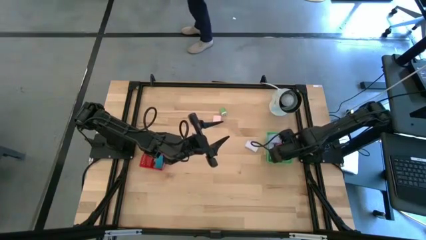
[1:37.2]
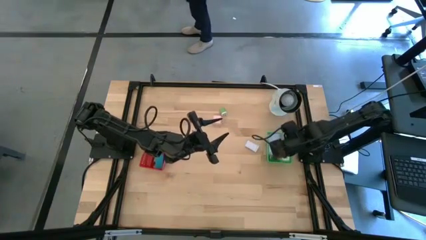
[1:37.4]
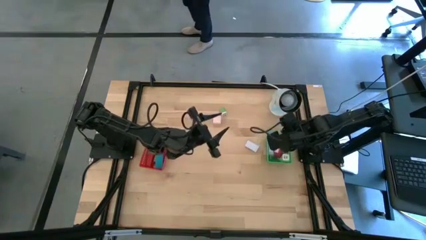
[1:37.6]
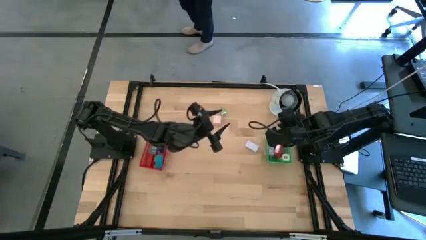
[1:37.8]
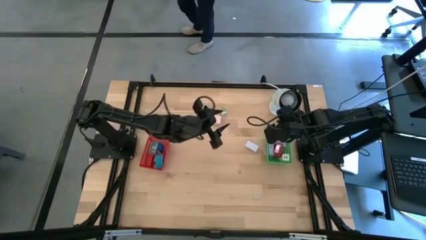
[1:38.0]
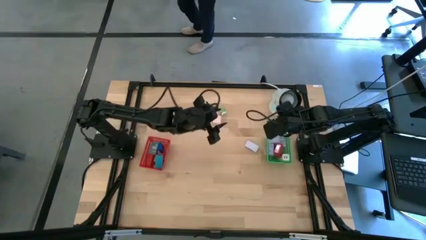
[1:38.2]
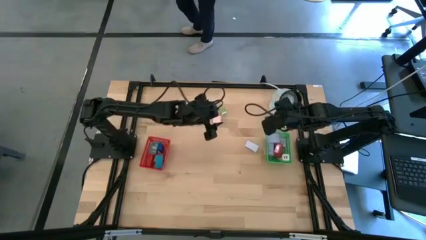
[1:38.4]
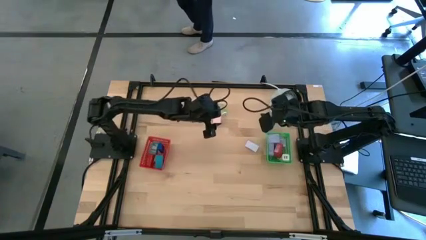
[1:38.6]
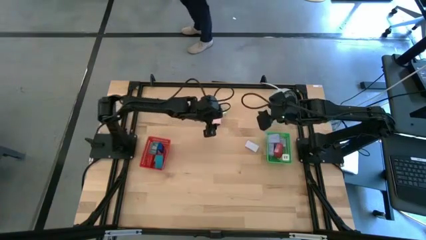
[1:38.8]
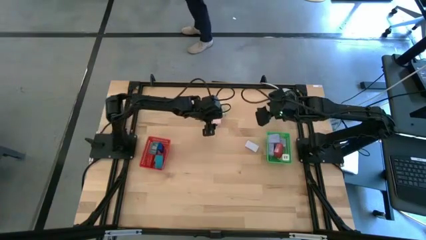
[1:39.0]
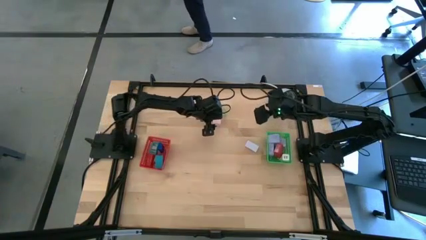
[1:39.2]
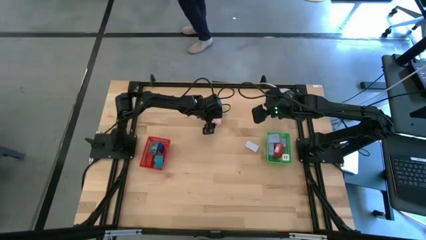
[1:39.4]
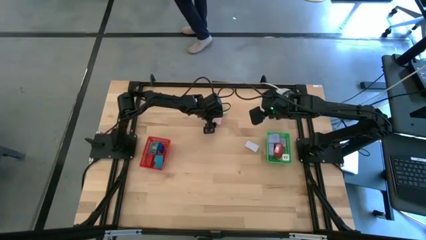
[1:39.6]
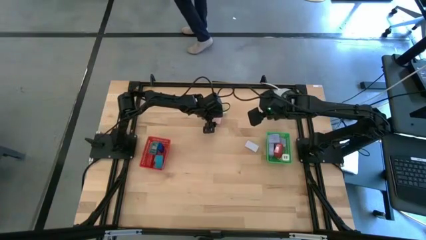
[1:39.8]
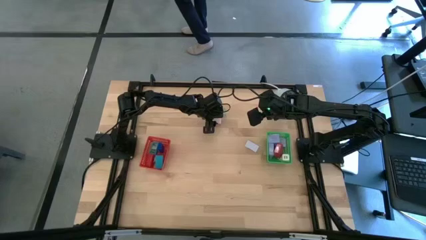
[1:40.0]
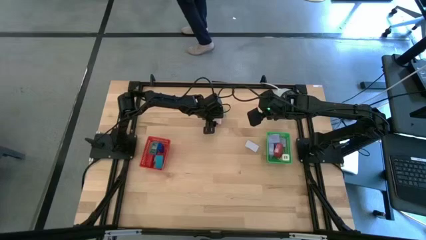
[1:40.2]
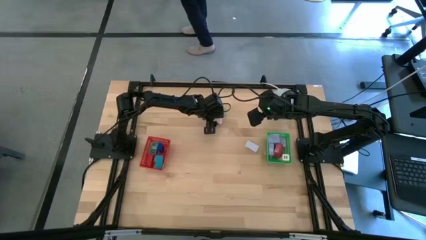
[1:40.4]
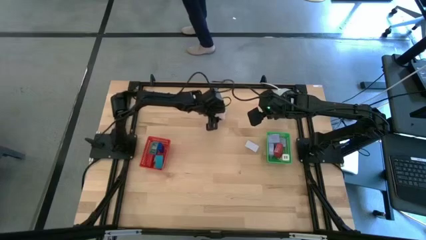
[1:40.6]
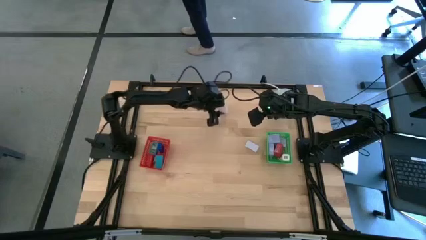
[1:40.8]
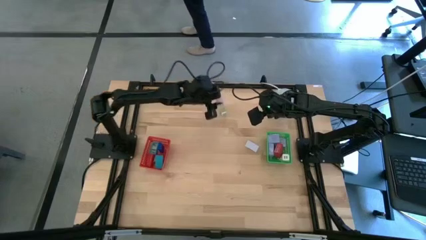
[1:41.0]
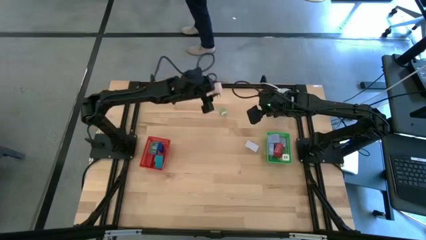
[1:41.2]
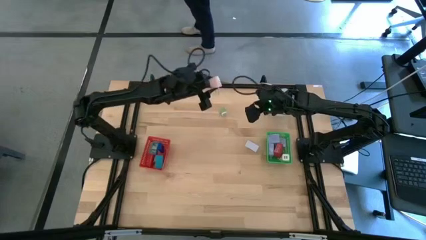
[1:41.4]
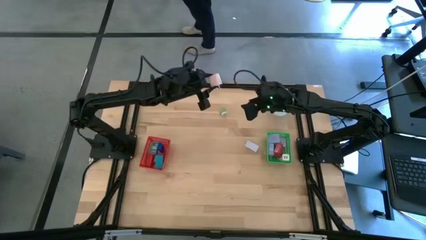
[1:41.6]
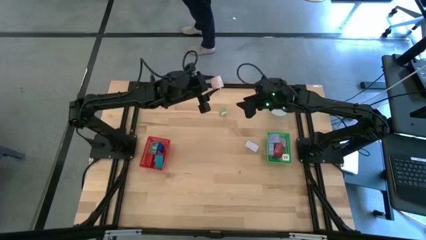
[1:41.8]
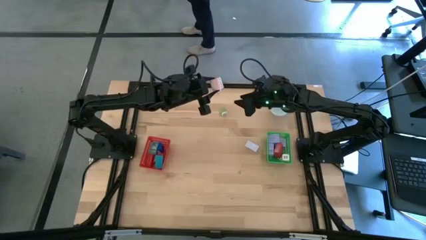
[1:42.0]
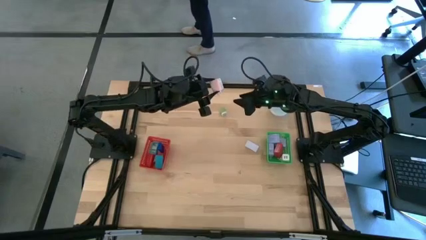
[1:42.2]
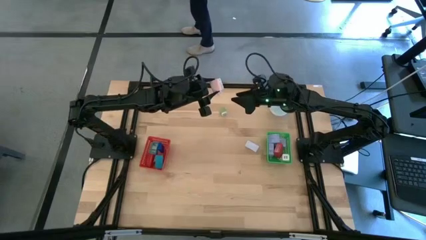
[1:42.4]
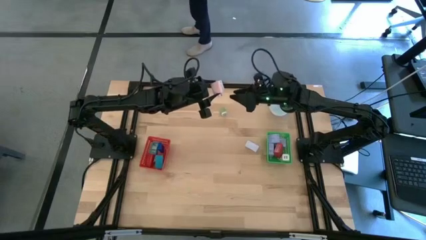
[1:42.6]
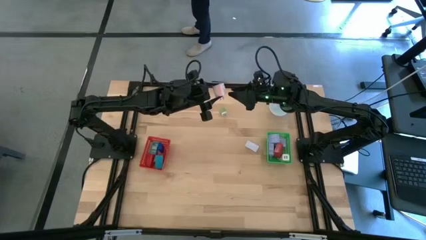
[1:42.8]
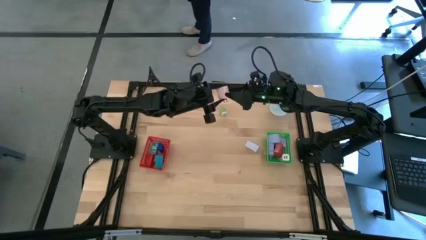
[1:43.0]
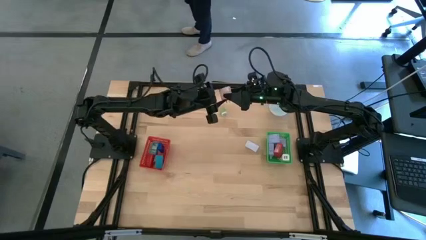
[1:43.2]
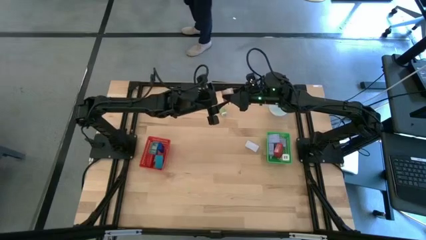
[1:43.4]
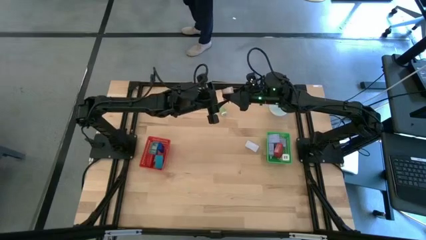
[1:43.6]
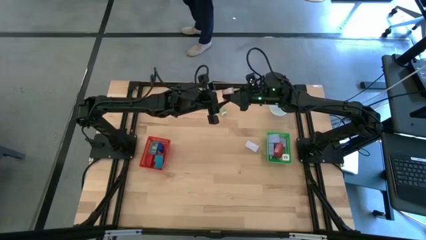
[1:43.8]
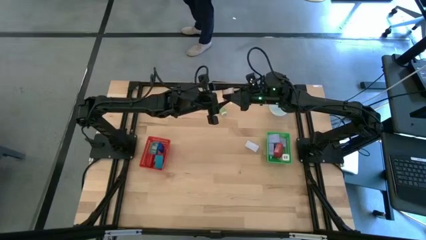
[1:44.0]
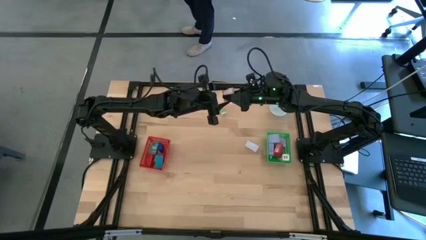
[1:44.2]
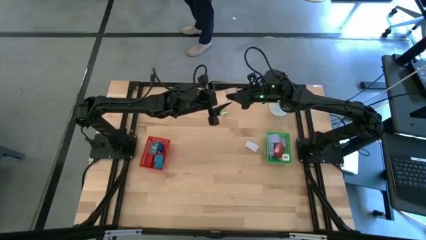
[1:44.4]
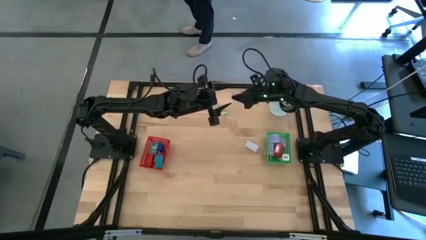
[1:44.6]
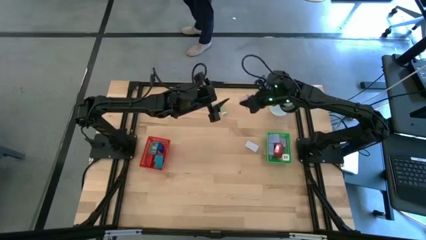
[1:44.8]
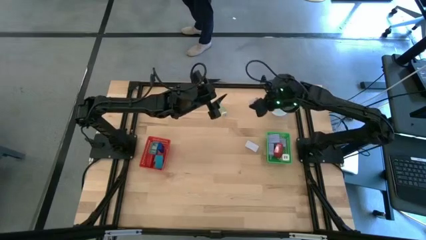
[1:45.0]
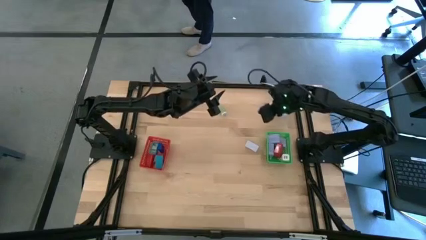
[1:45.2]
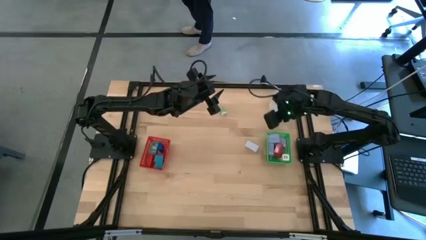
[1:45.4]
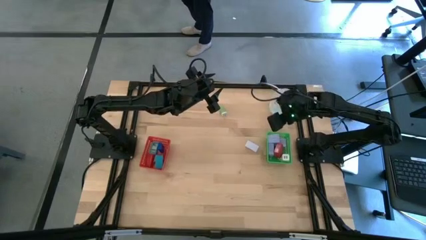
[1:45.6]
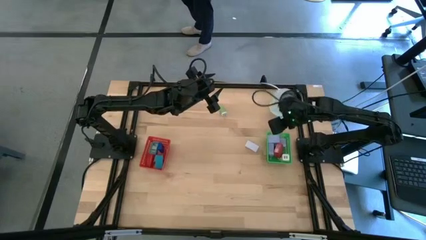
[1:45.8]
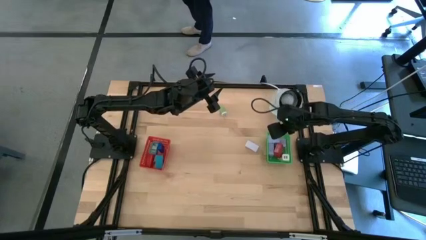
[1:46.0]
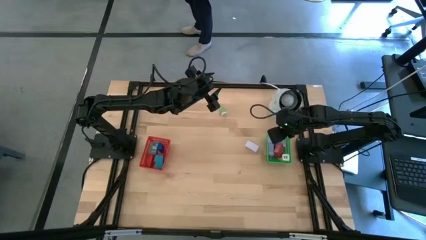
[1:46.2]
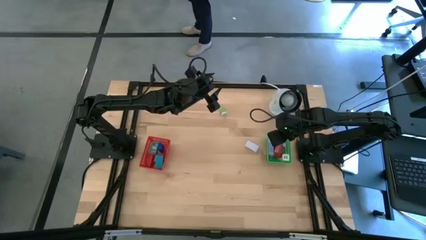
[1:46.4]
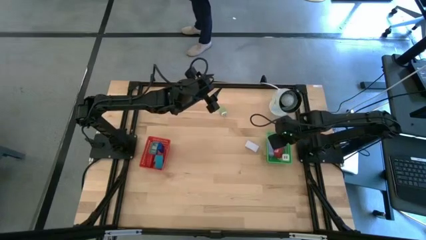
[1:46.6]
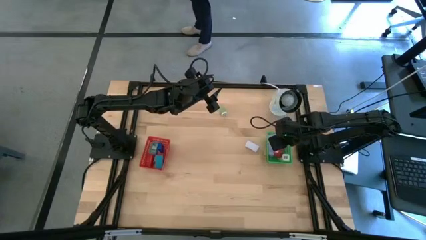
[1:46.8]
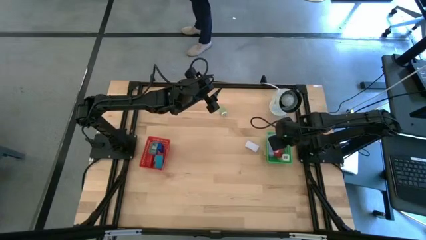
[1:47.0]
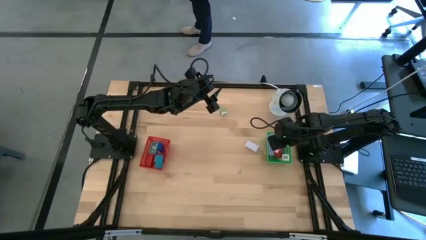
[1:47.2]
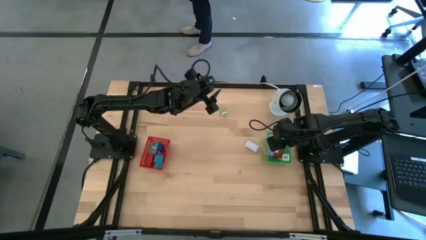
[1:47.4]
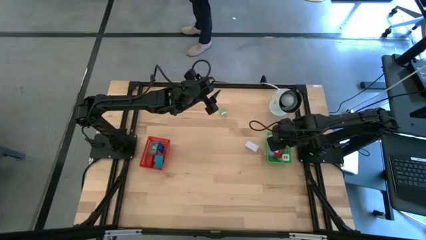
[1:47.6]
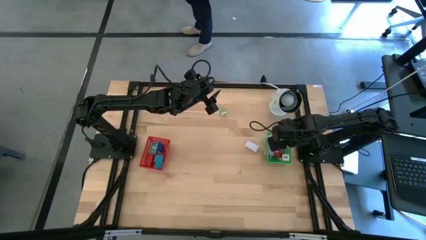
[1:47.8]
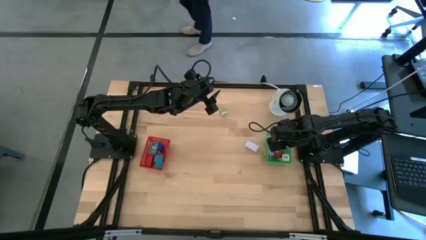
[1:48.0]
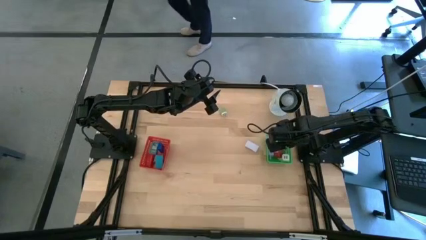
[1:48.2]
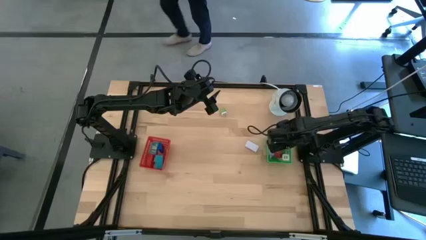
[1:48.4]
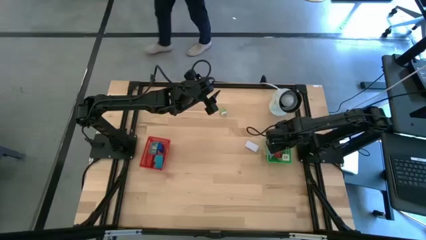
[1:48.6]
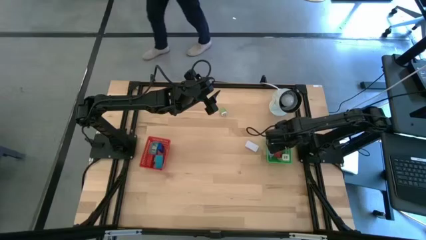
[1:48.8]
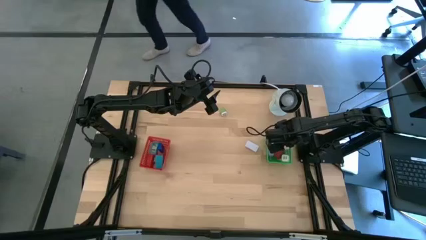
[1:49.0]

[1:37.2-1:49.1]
Task: Pick & Place Office items
Put the pink charger adapter into the green basket

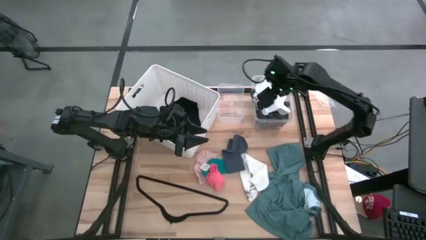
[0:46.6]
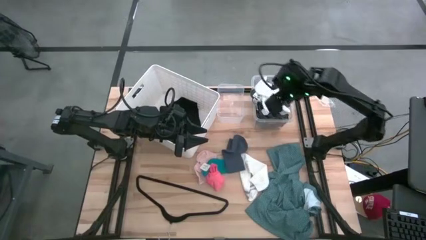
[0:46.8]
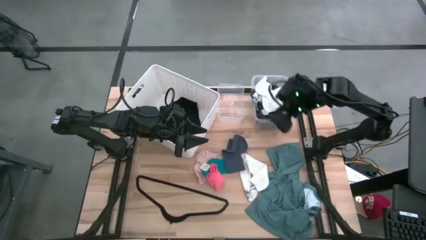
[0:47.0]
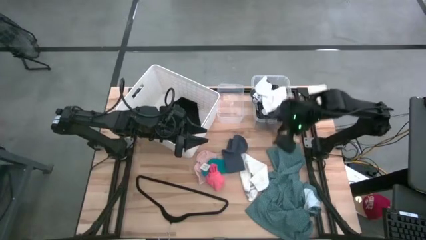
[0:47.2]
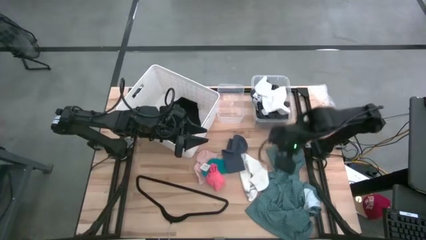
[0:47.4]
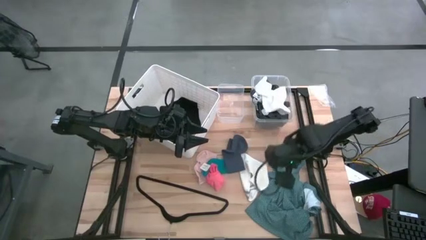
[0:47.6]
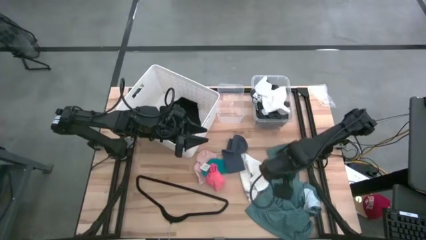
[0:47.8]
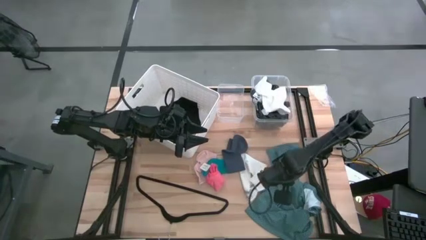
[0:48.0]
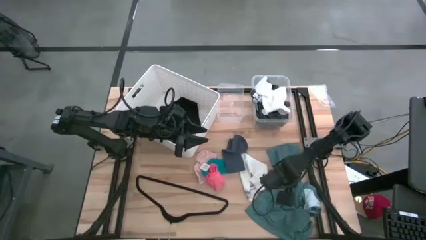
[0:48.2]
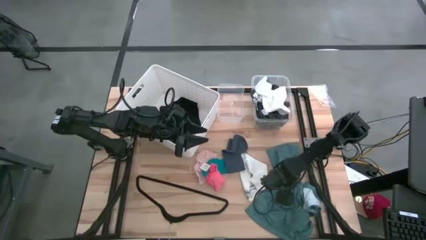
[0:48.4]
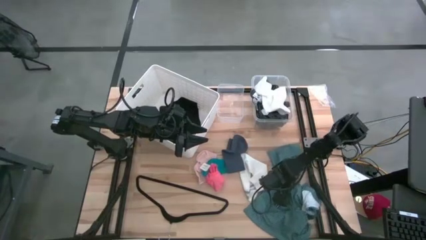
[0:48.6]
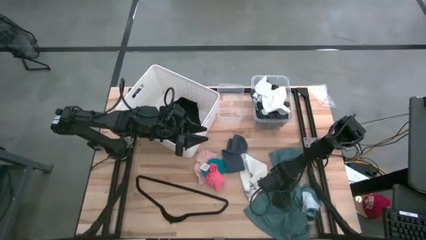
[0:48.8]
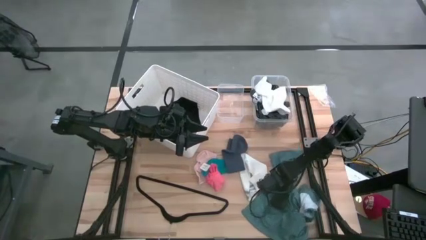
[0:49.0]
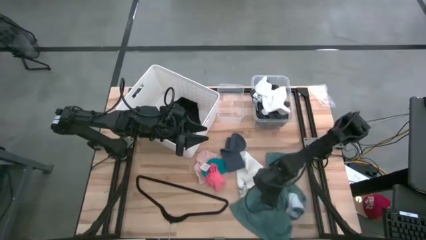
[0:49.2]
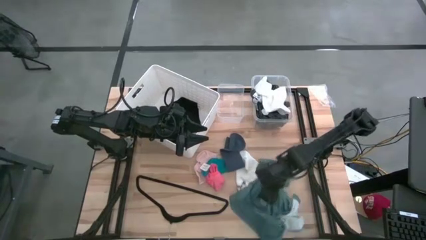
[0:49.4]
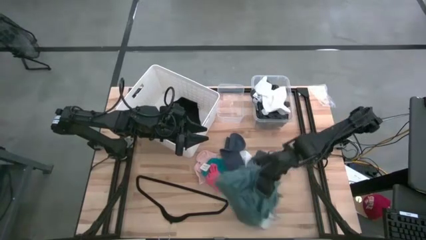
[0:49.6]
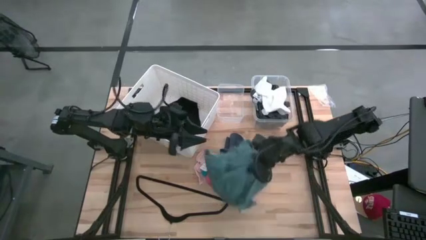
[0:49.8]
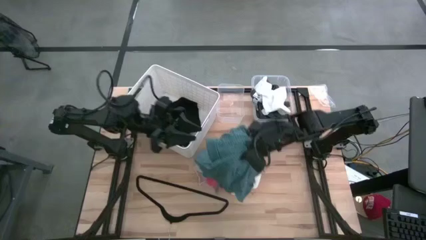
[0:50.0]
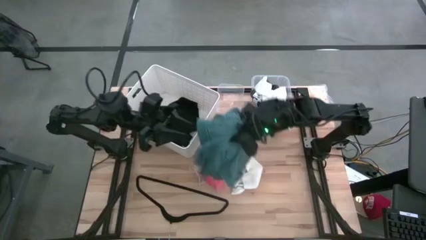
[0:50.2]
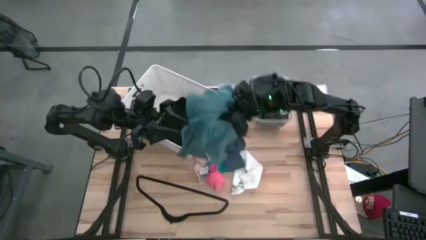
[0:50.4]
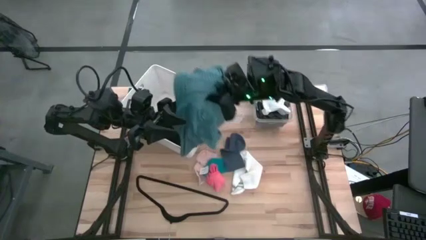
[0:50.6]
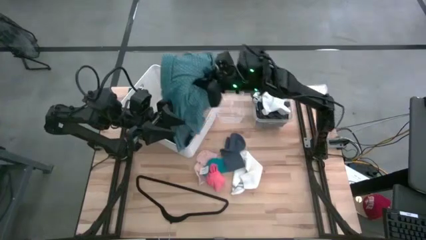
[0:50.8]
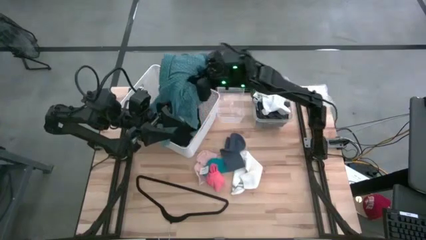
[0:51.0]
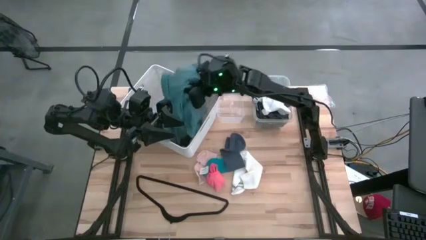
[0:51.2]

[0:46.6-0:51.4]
Task: Pick & Place Cloths
Put the blue shirt into the white bin

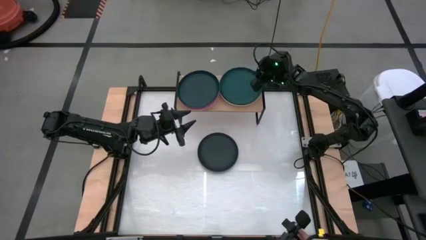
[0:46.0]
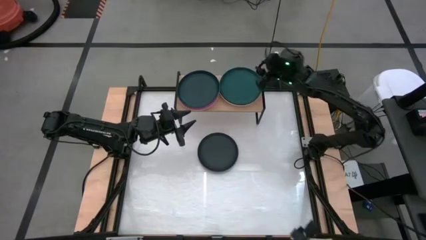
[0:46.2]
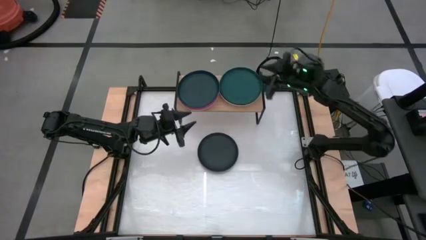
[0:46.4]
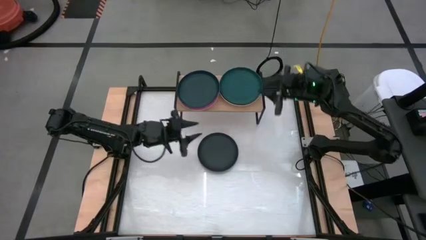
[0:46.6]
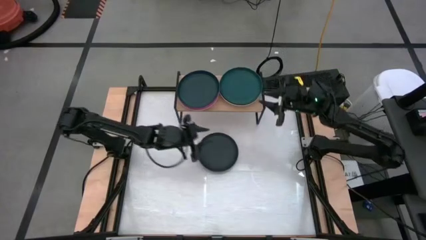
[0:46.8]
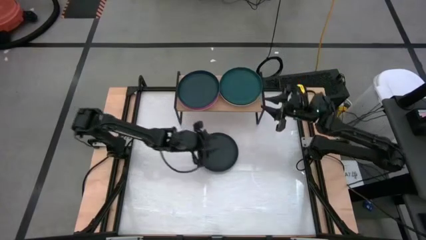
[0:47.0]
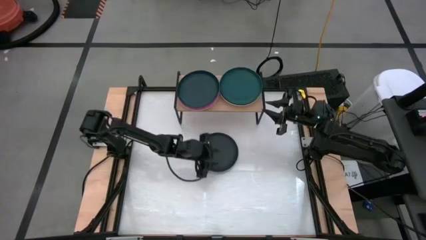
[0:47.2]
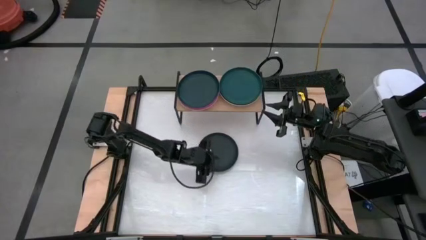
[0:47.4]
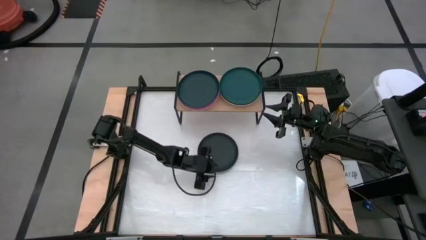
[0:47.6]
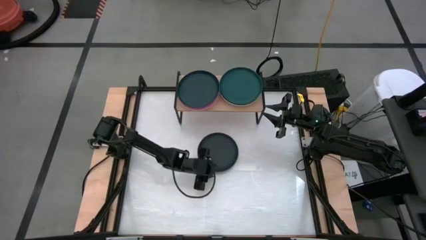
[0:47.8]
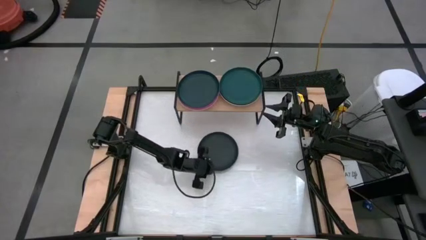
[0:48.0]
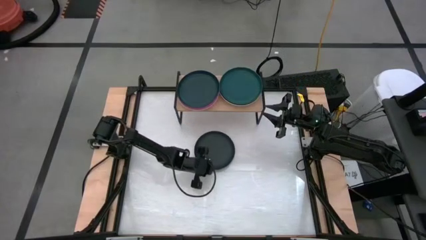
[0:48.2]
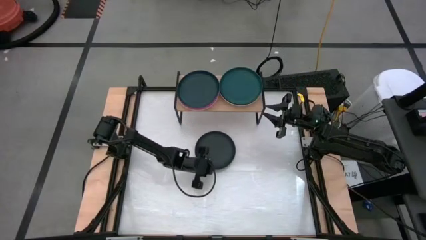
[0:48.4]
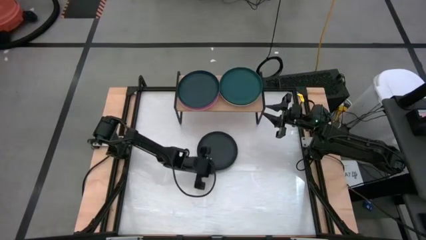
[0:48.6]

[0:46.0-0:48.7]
Task: Place and stack plates onto a shelf
Stack the black plate on top of the green plate on the shelf
